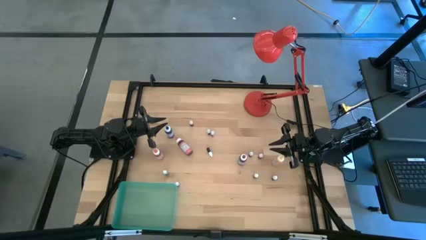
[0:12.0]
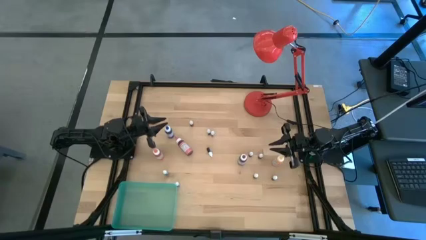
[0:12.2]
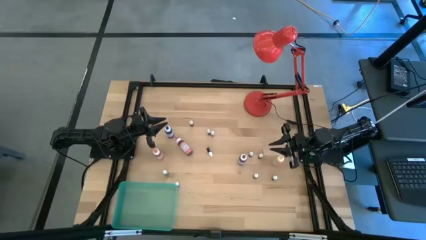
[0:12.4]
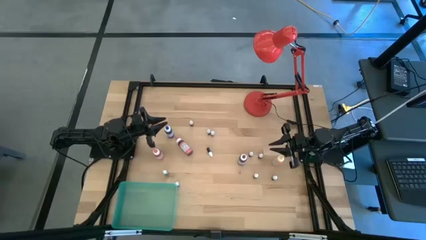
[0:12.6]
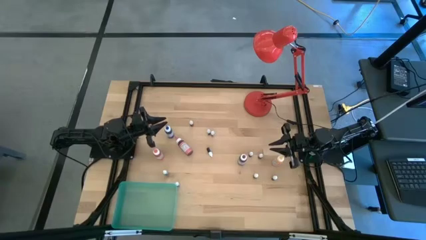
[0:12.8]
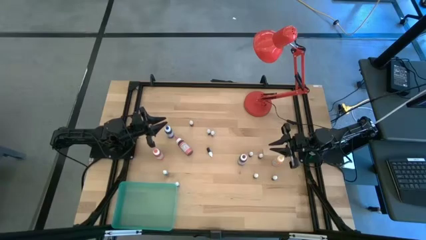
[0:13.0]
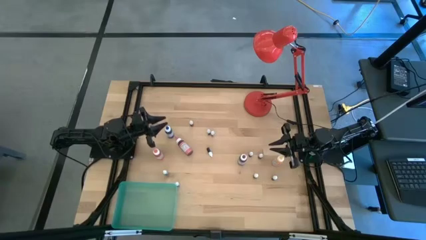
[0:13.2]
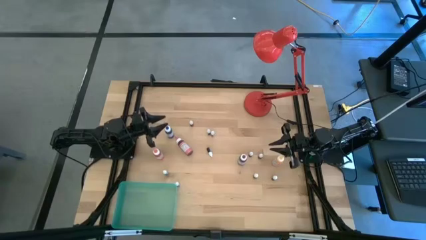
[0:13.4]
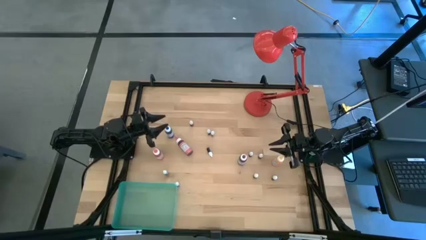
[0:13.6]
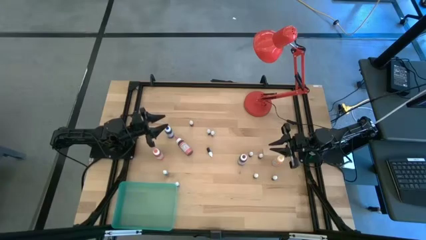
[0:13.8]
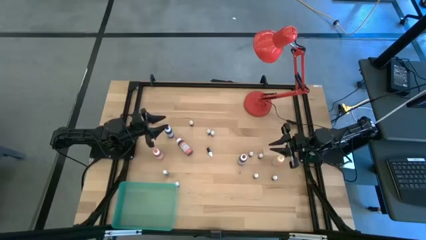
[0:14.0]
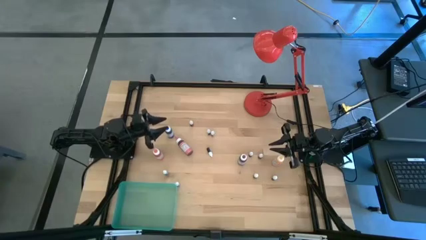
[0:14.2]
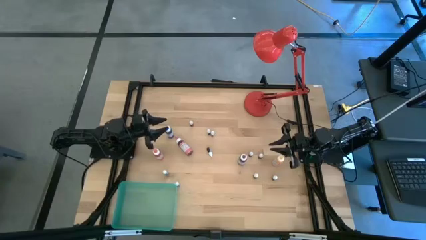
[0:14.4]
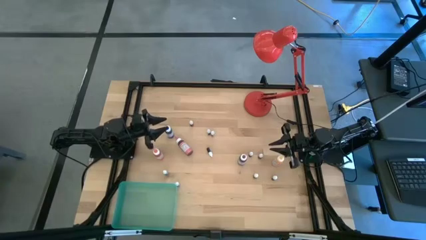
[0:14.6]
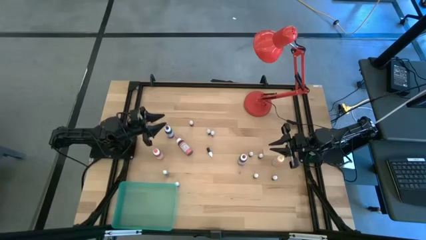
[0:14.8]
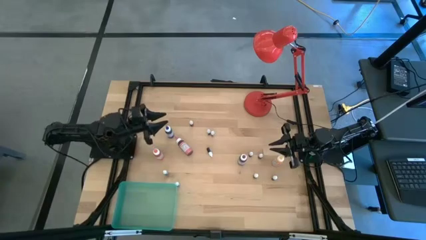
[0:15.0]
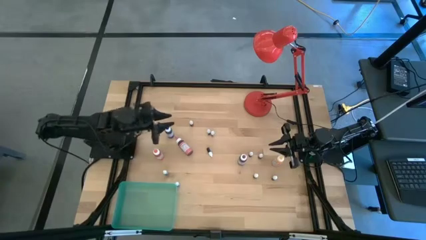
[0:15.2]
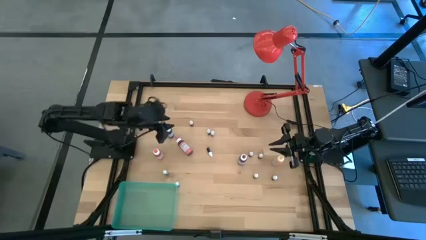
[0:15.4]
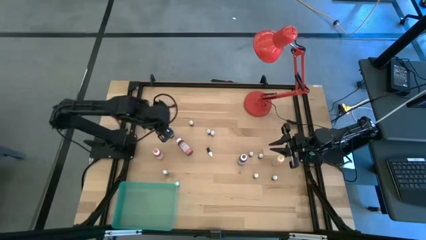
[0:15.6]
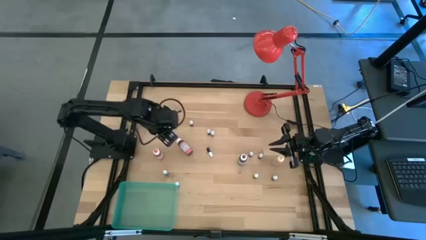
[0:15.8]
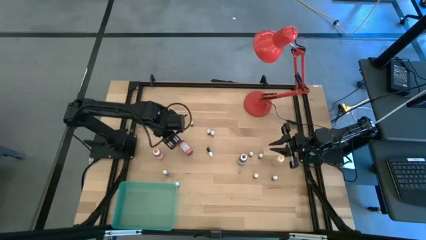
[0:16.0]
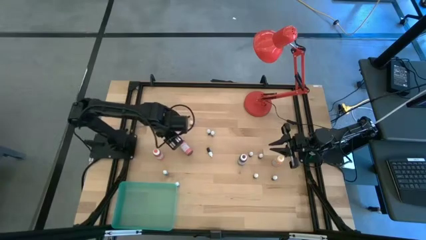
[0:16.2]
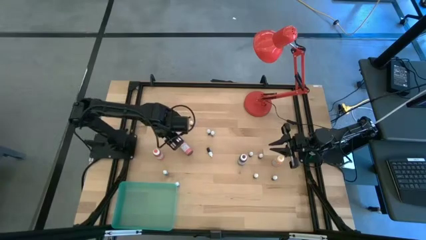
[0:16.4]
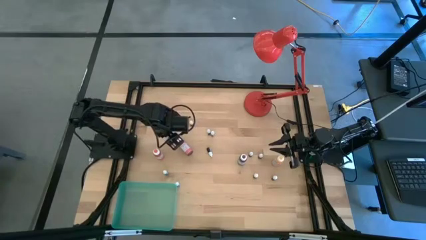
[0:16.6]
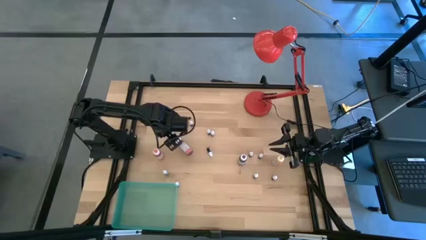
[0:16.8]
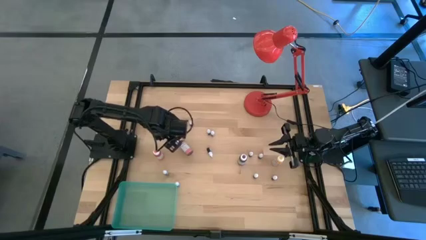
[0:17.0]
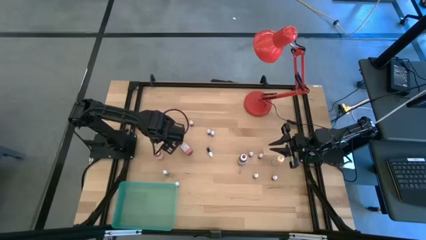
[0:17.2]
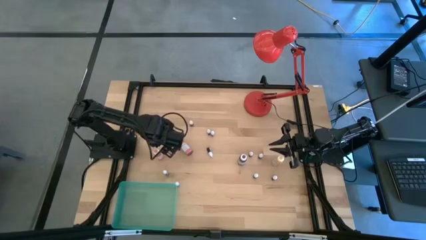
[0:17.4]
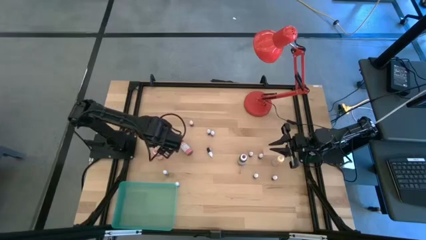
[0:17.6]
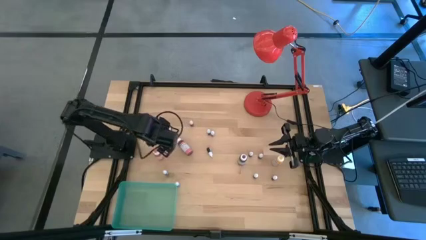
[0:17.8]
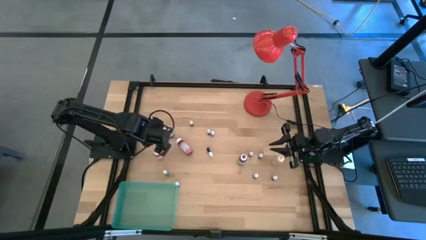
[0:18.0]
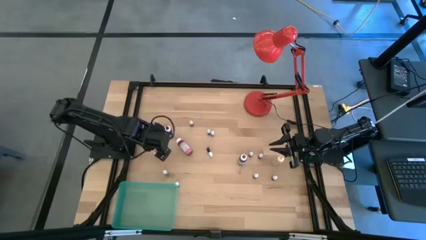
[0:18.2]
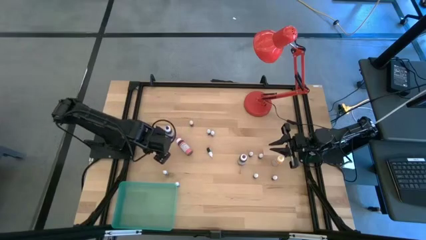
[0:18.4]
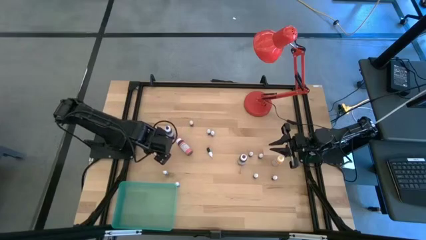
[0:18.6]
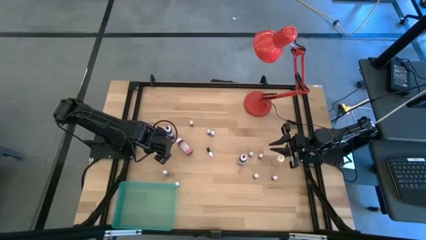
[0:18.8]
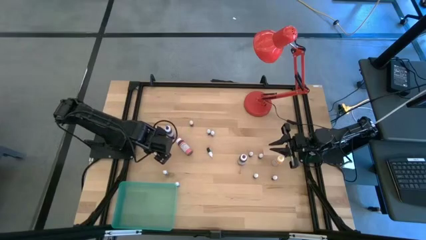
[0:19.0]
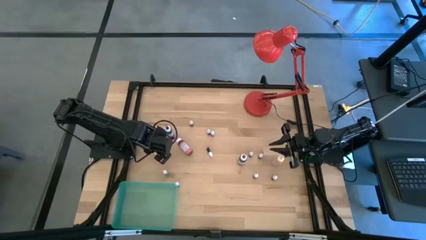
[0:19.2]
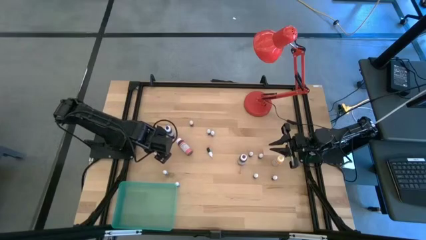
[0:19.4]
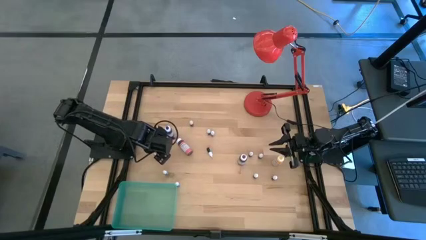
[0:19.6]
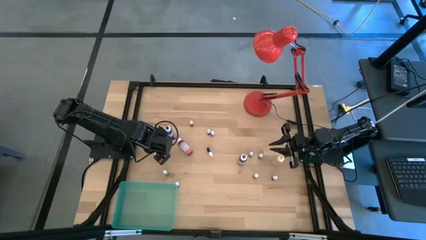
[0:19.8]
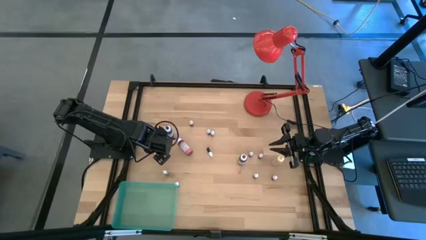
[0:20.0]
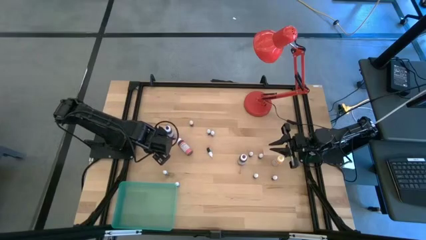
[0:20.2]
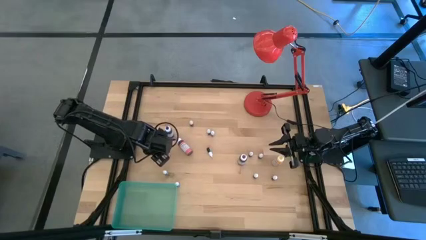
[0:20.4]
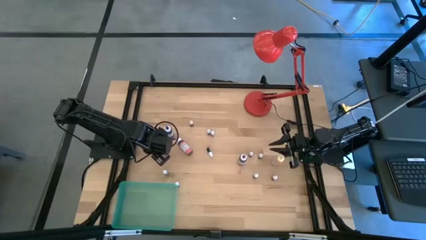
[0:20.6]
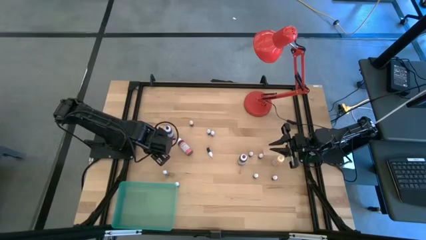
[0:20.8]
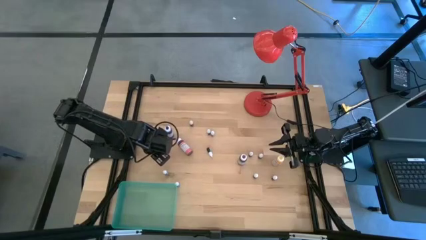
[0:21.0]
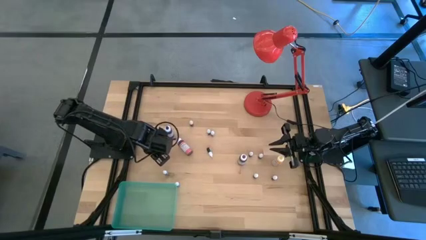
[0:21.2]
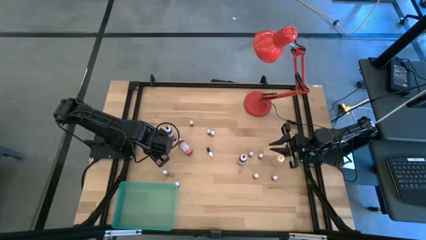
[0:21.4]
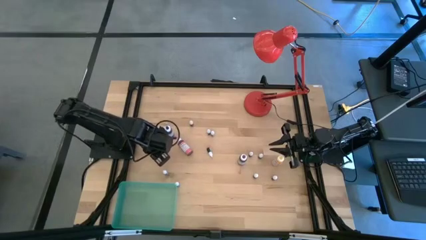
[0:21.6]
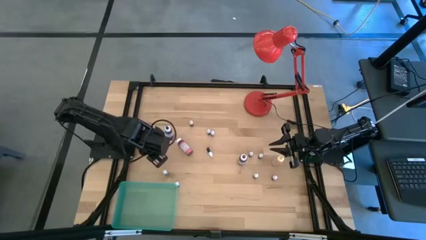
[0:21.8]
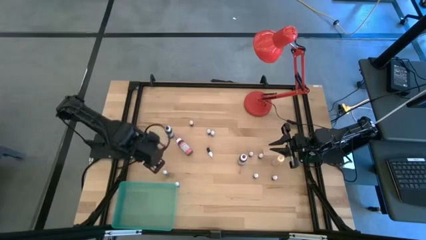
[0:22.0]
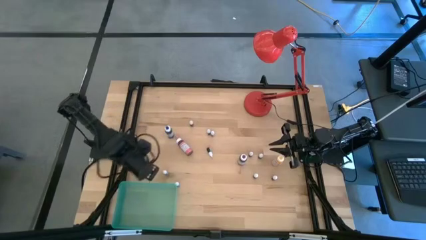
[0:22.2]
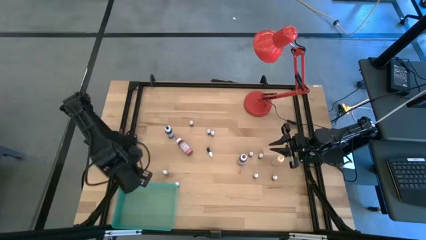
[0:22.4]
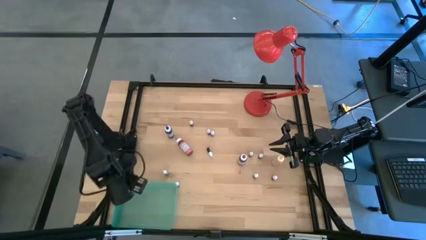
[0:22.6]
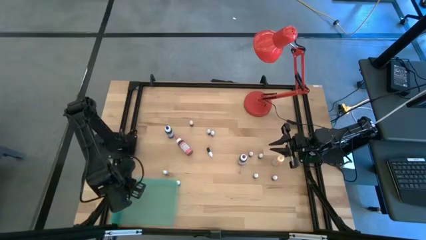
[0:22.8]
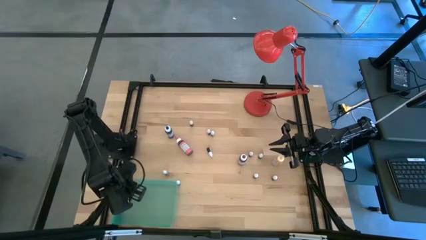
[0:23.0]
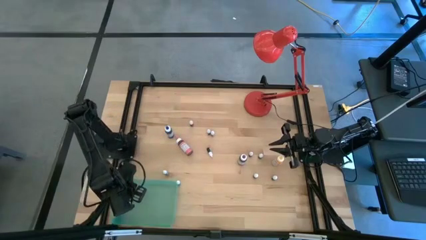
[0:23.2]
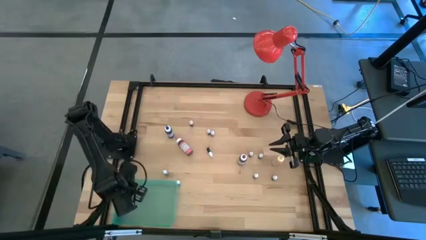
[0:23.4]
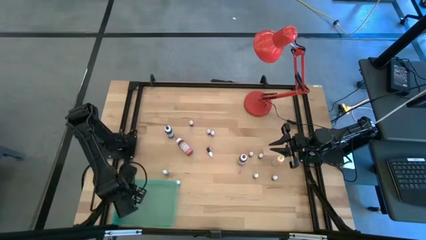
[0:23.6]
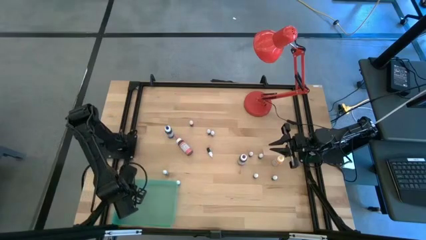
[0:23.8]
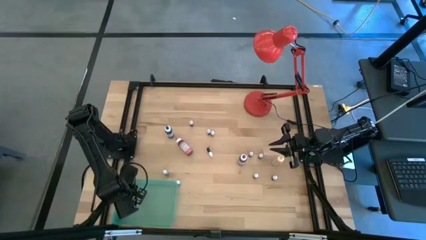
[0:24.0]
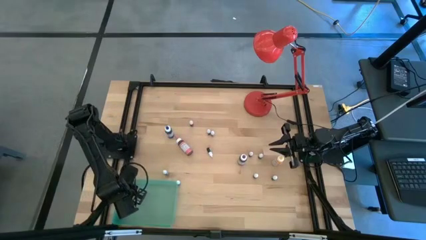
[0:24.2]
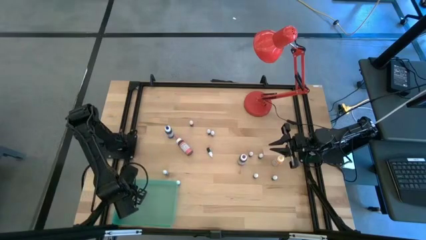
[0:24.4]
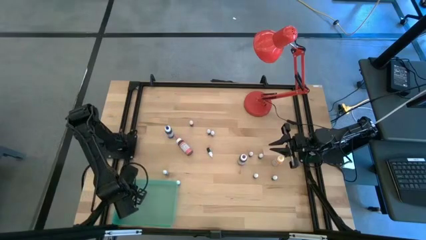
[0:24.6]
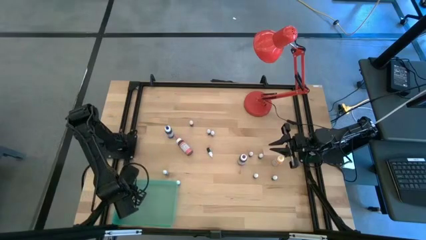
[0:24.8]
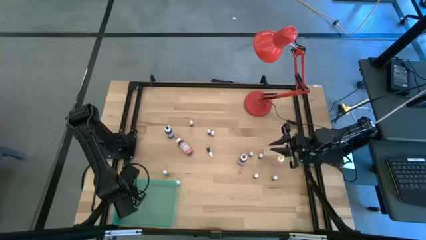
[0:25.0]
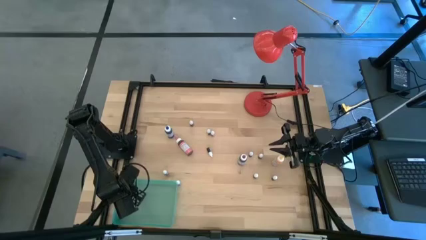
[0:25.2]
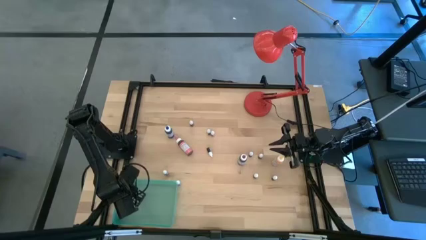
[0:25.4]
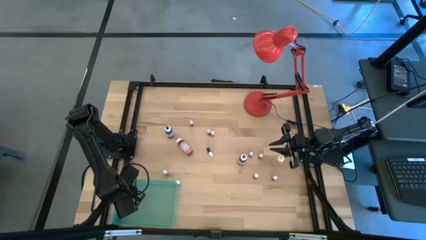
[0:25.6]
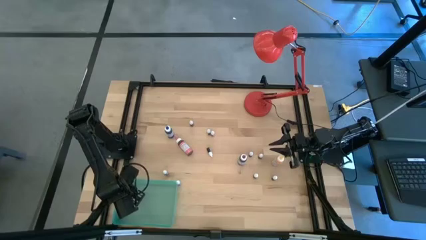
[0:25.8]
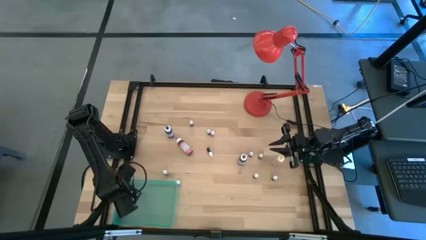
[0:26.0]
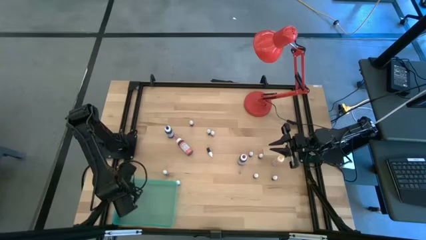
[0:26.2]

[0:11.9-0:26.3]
Task: Pick & Place food coloring
Put the orange food coloring into the blue bin
